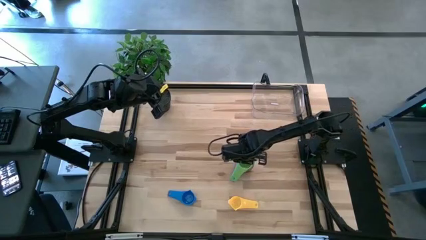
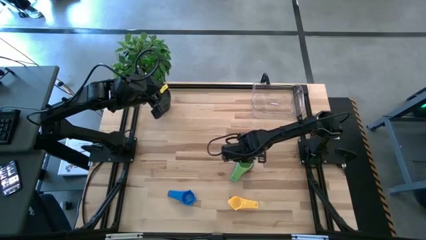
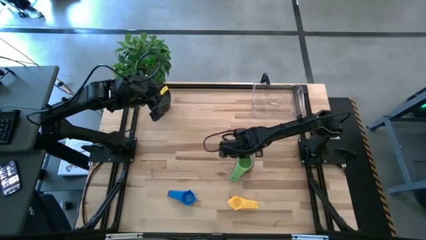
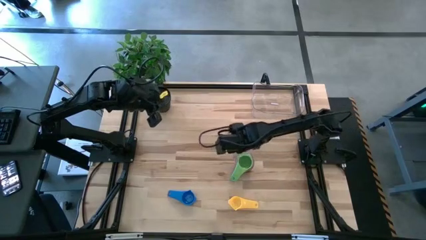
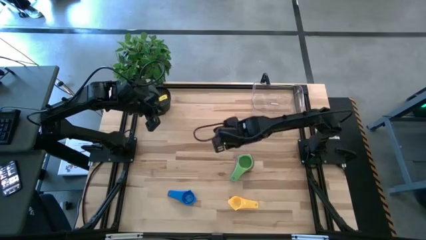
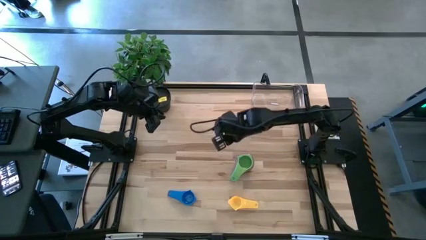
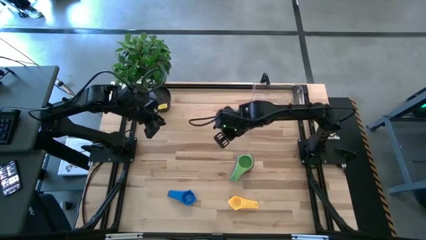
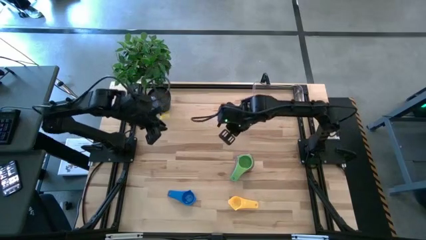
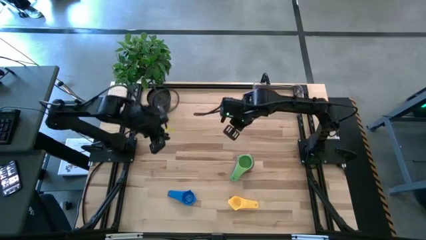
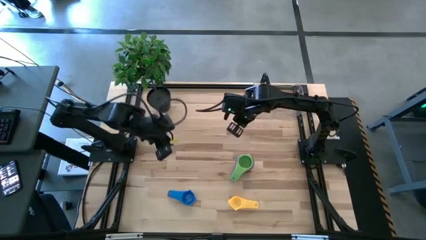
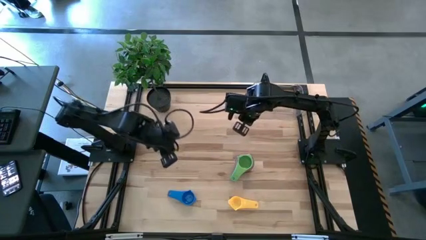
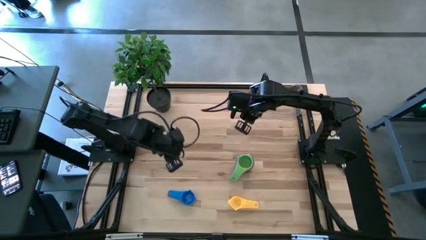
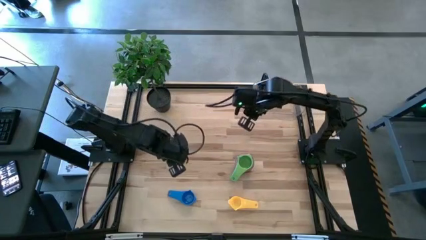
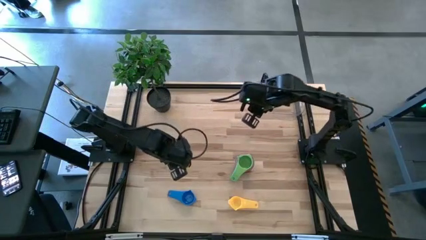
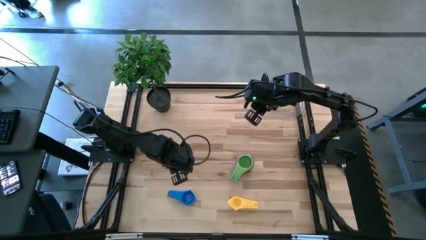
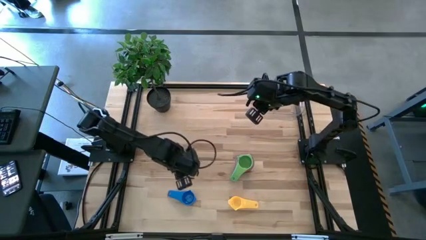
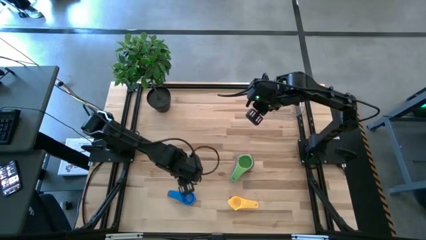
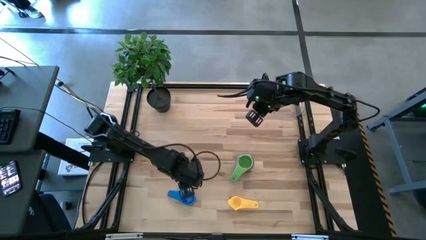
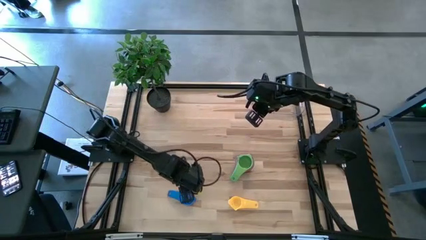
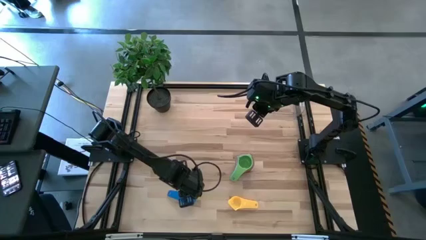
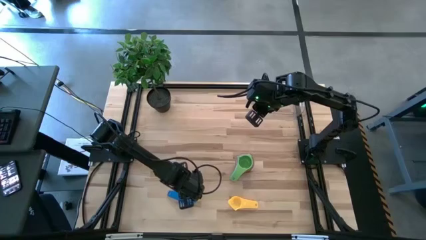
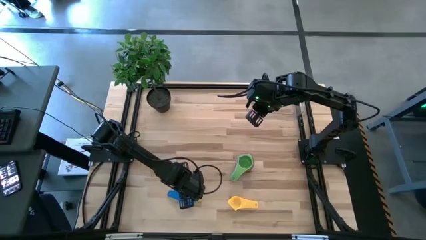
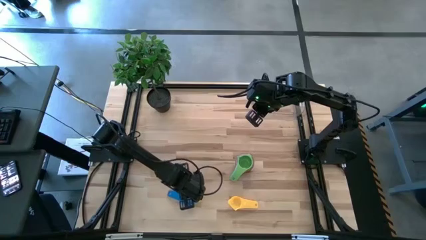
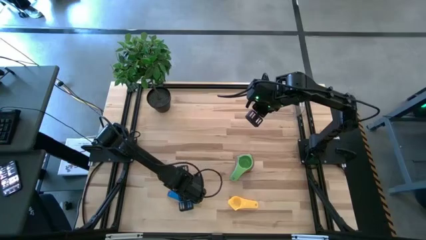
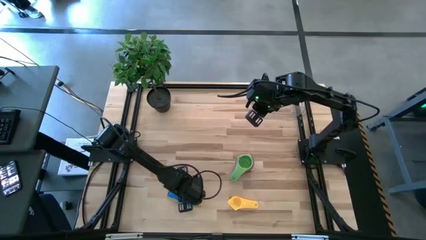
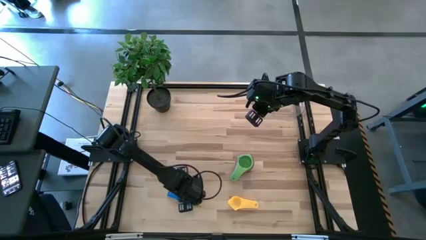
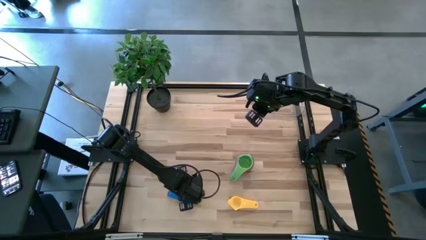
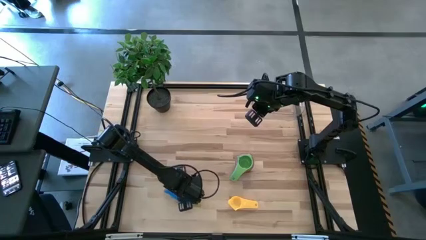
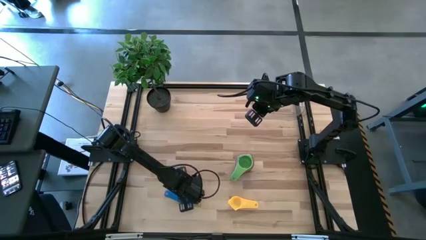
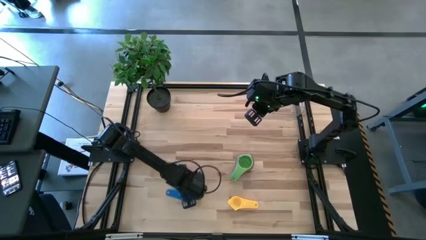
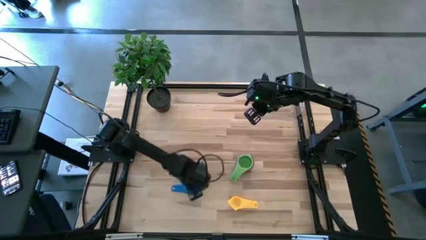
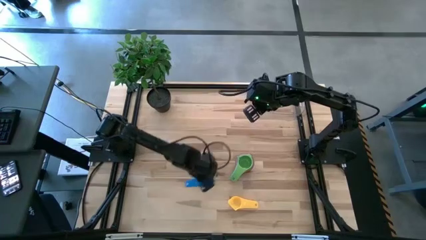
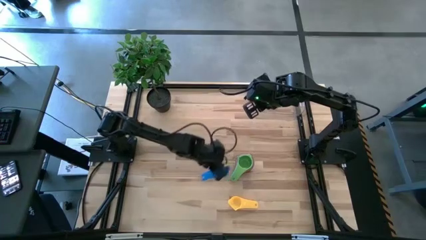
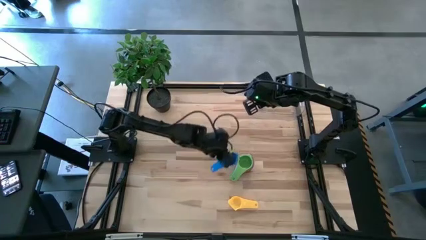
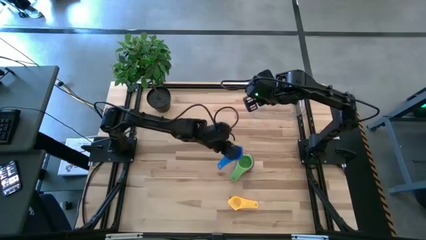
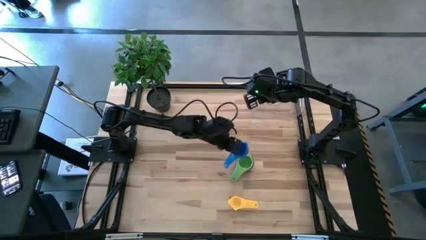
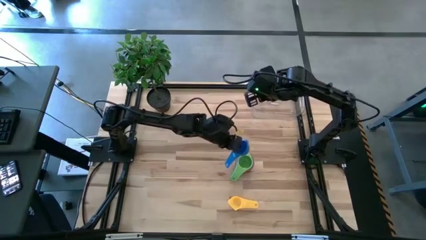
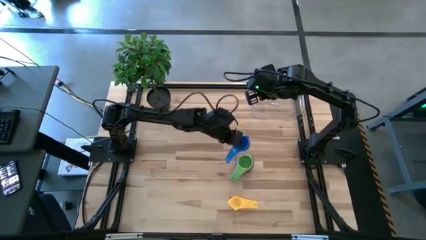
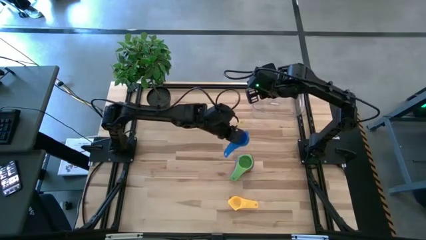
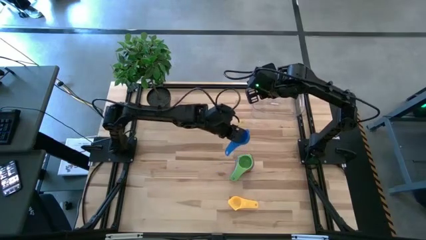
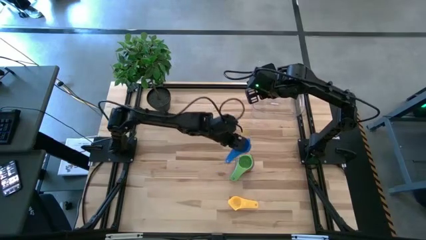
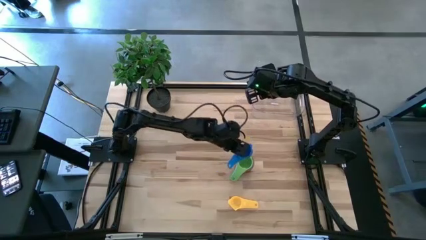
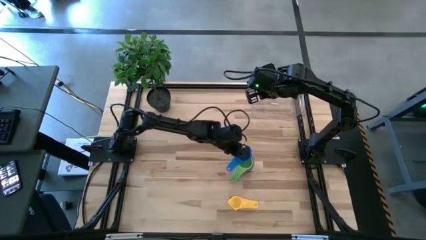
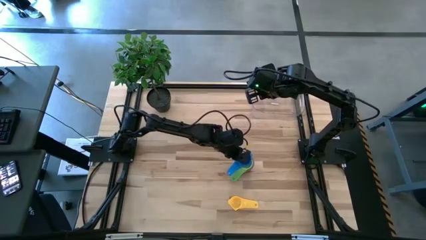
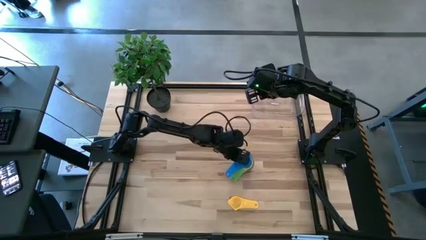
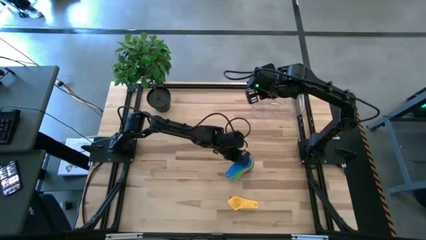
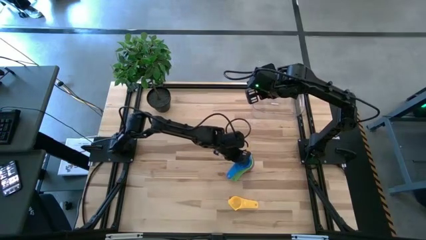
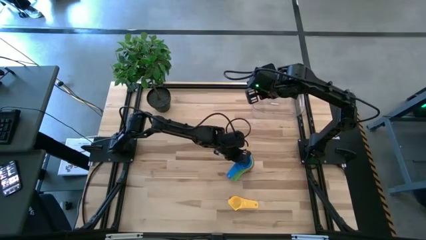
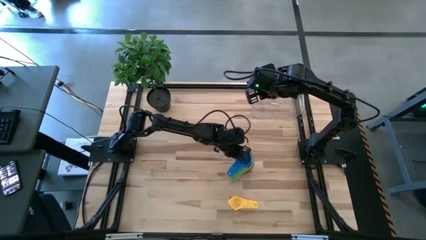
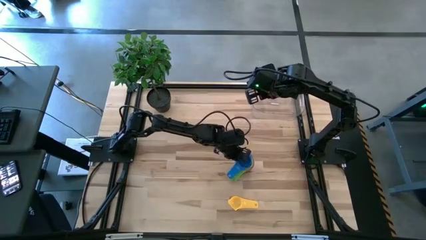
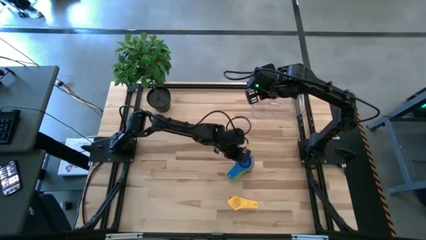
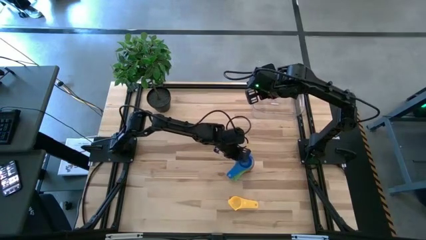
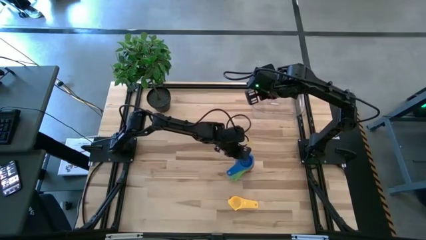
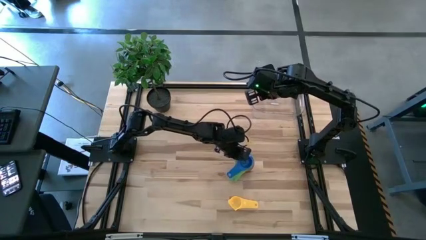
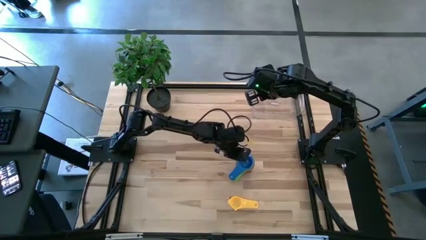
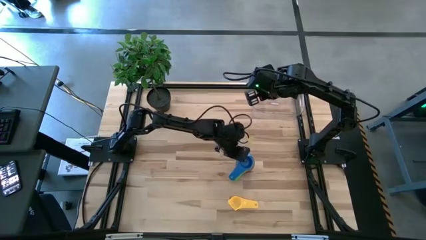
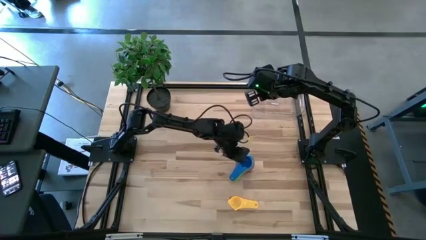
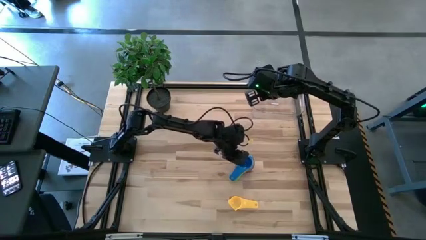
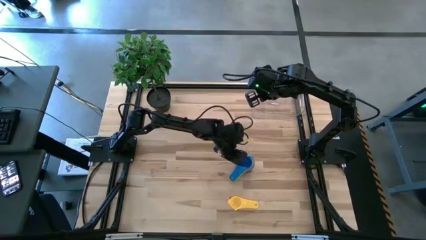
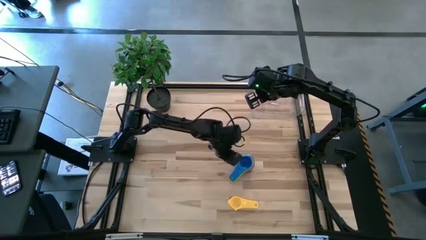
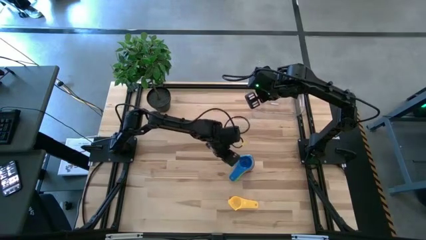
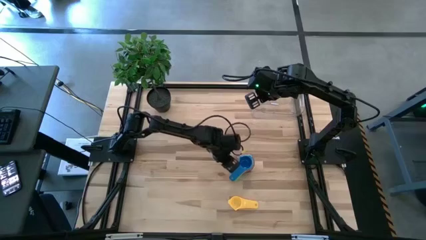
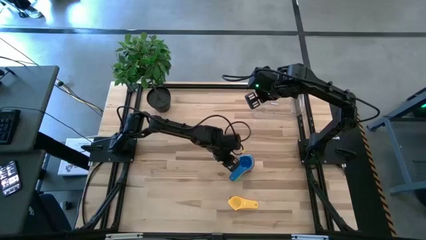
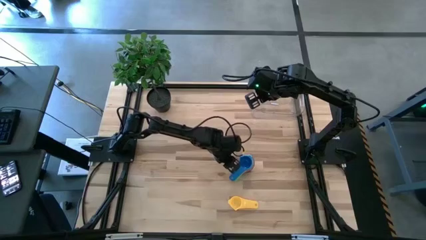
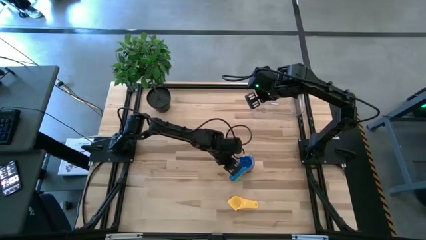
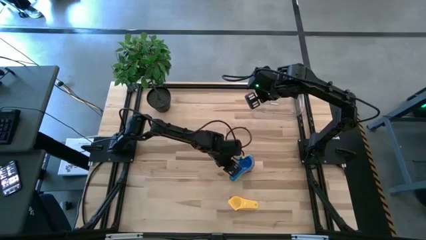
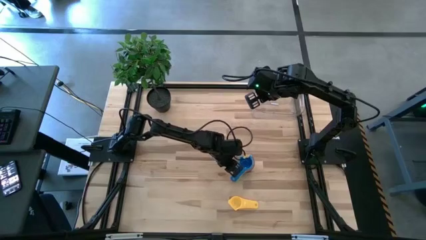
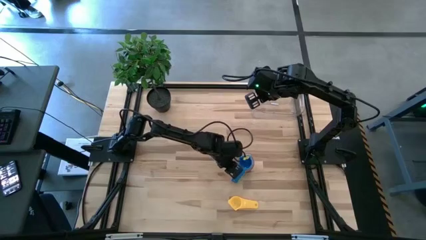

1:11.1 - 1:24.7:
Task: Nest measuring cups in basket
Stack the blue measuring cup on top of the green measuring cup
